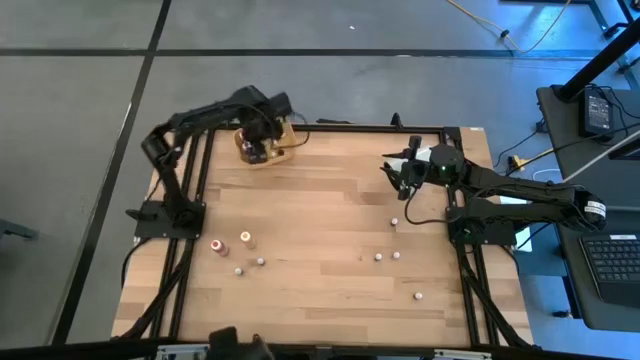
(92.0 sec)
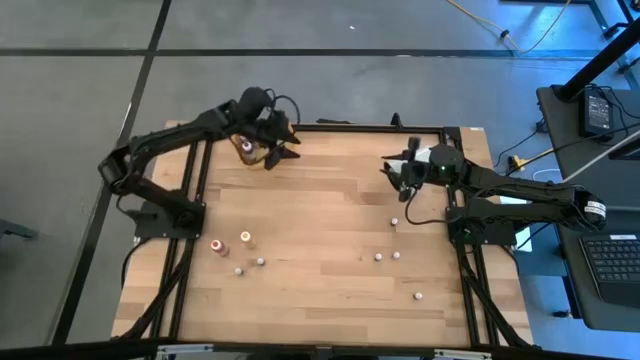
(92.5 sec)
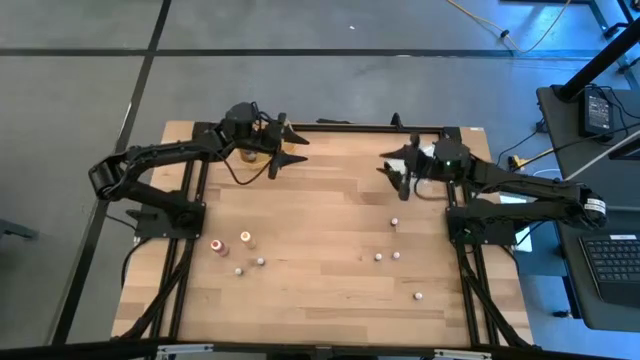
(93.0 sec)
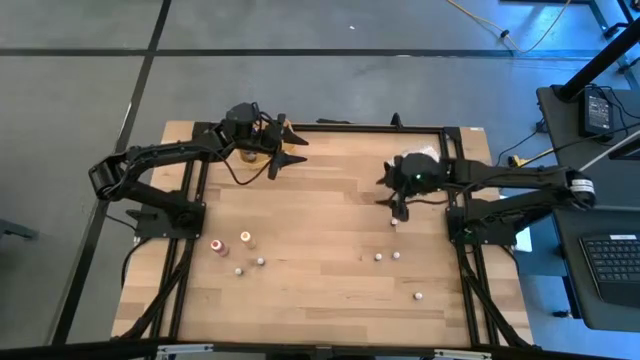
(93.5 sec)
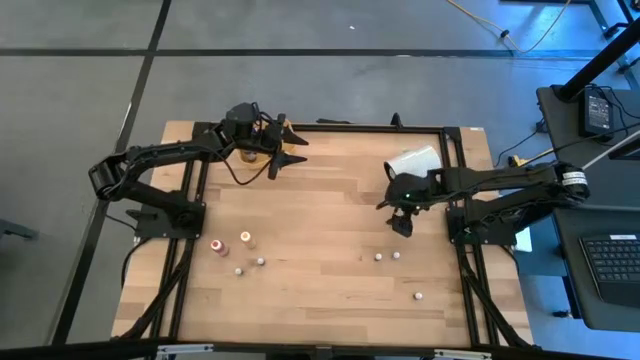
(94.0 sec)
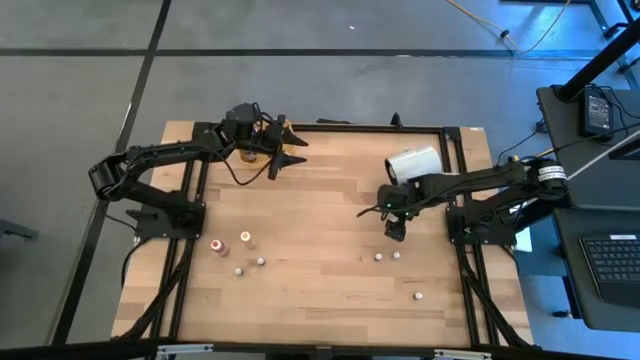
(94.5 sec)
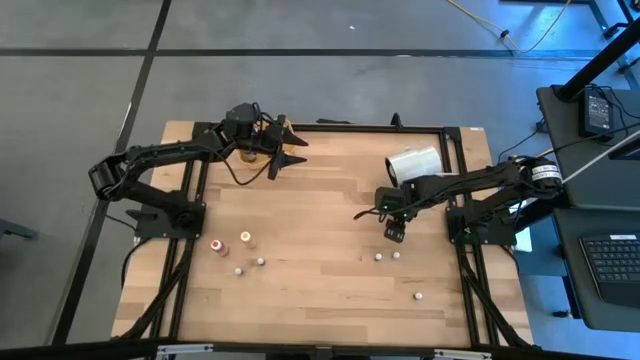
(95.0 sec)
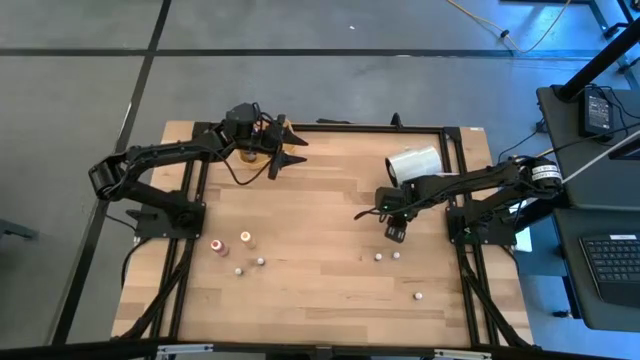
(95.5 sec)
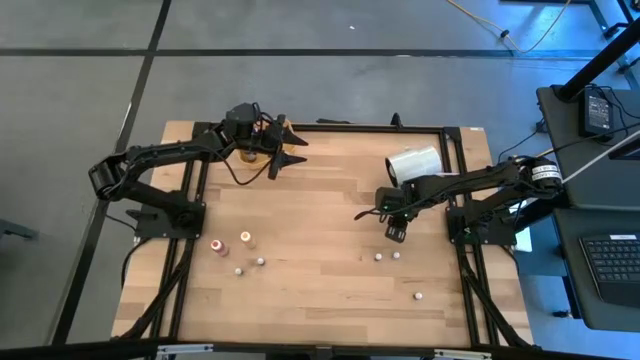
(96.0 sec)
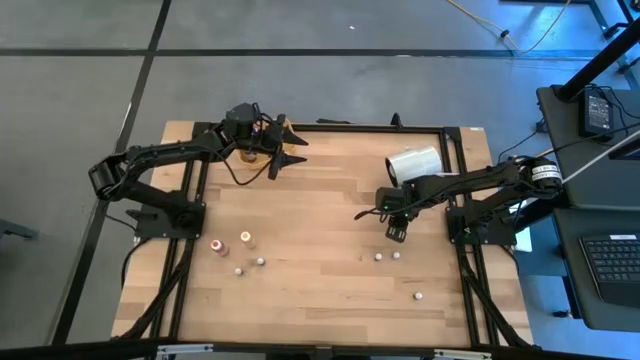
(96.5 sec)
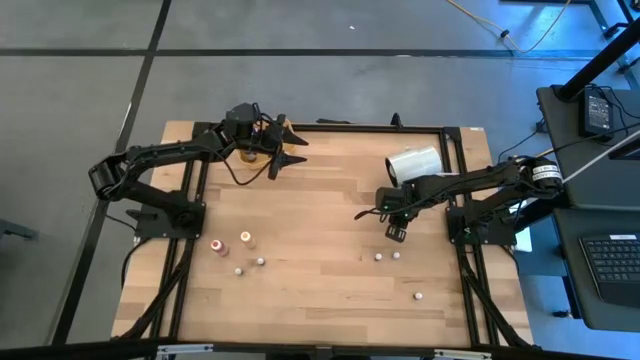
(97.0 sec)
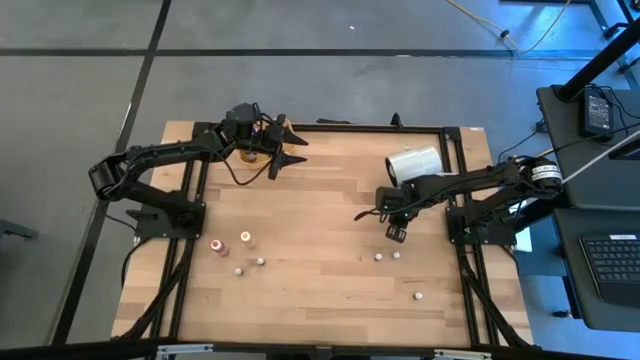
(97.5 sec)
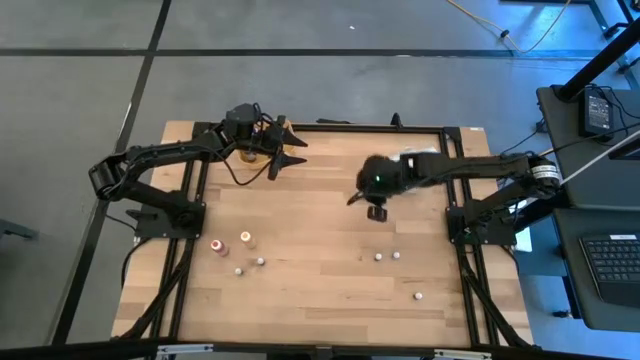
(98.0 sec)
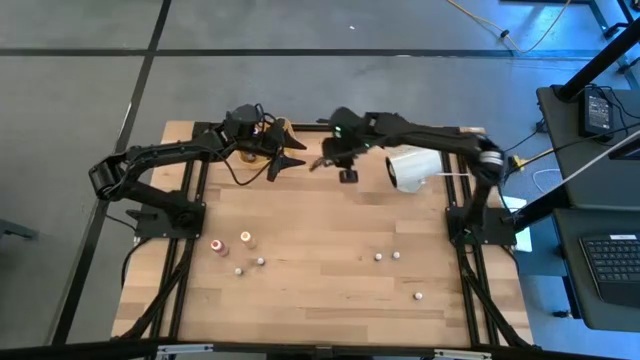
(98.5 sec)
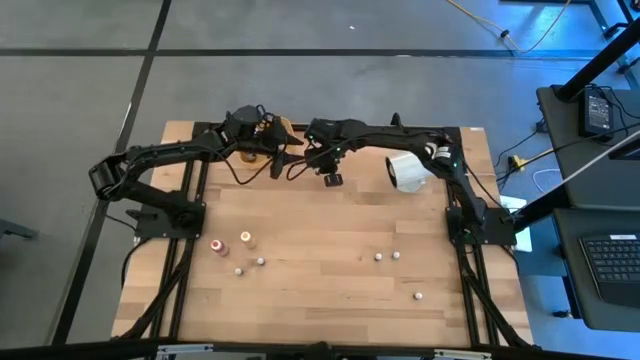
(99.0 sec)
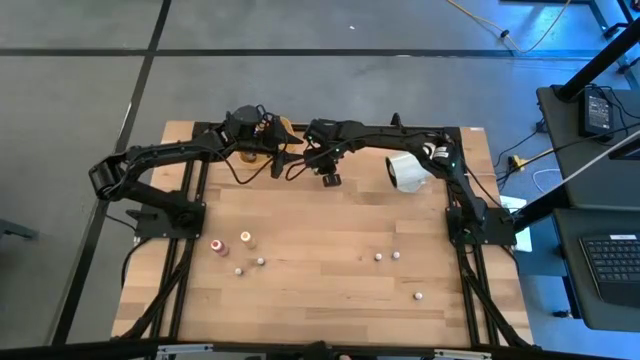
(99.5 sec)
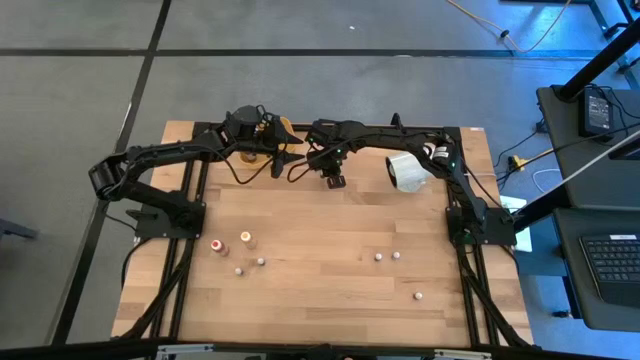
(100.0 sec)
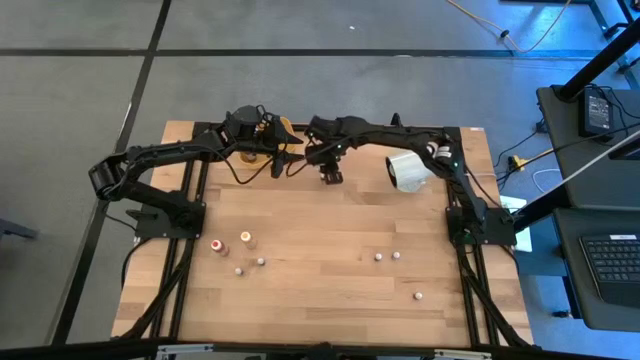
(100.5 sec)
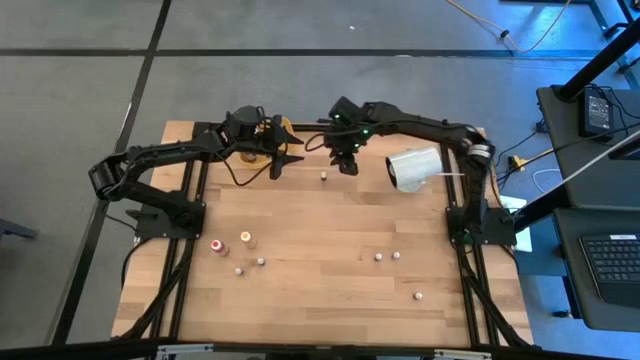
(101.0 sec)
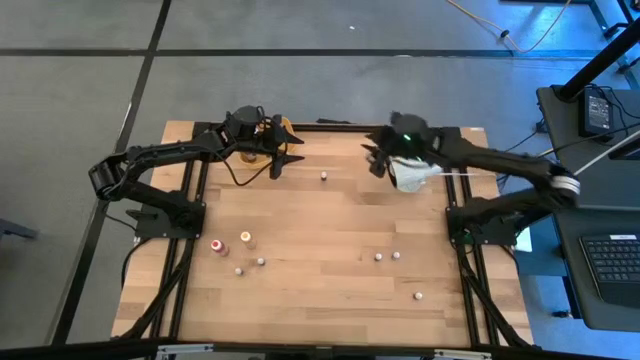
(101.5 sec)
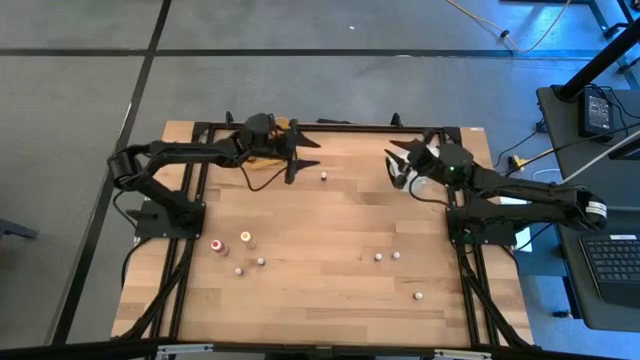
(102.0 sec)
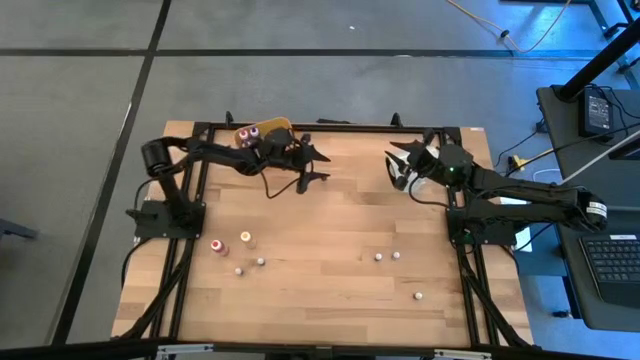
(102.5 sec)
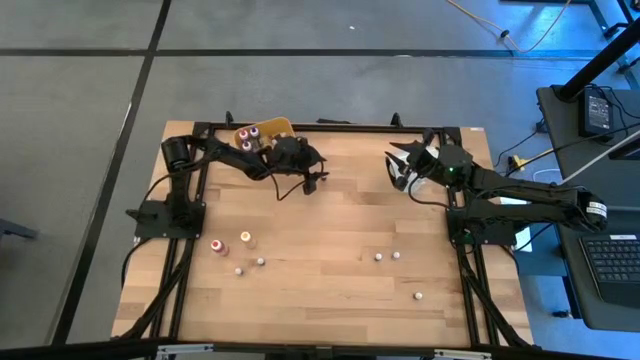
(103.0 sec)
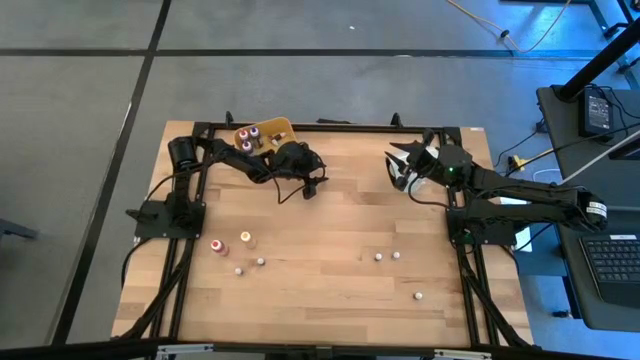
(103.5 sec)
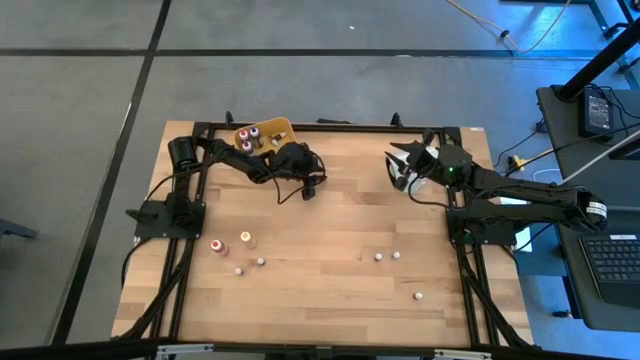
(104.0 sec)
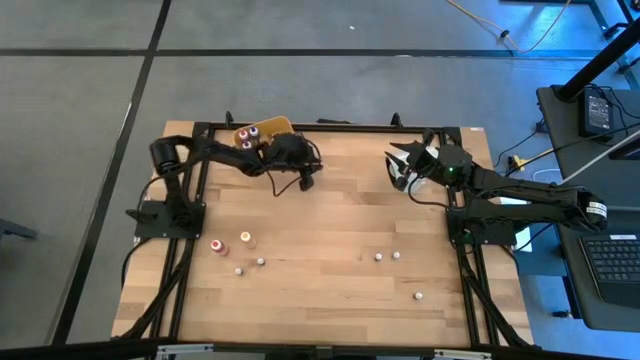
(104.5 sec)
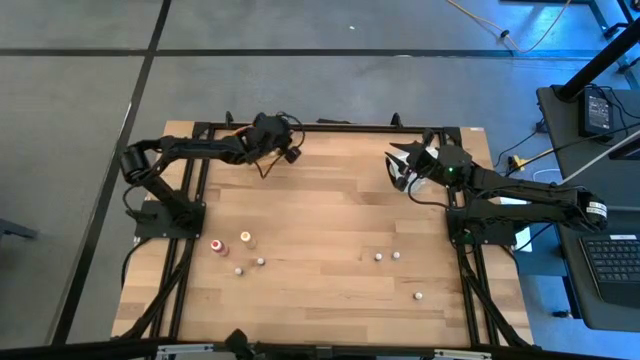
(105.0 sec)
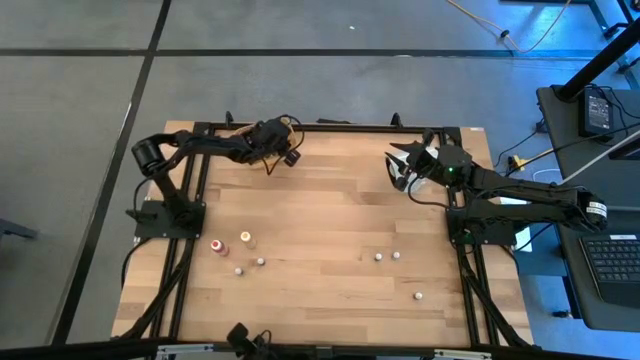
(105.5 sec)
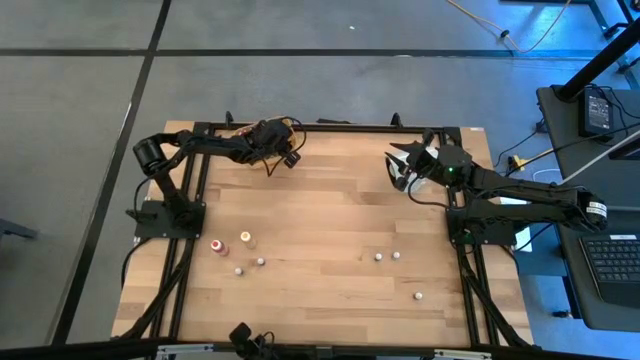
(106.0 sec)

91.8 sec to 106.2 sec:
Task: Pick & Place food coloring
Put the small red food coloring bottle into the yellow bin

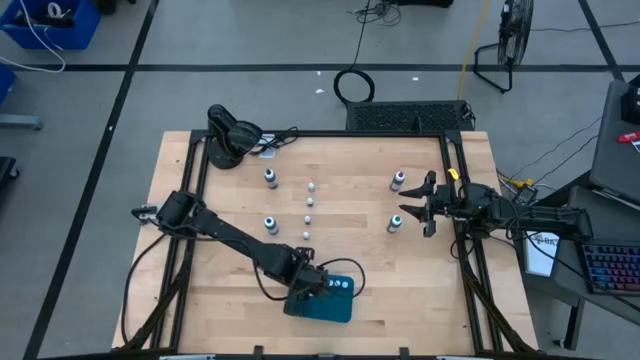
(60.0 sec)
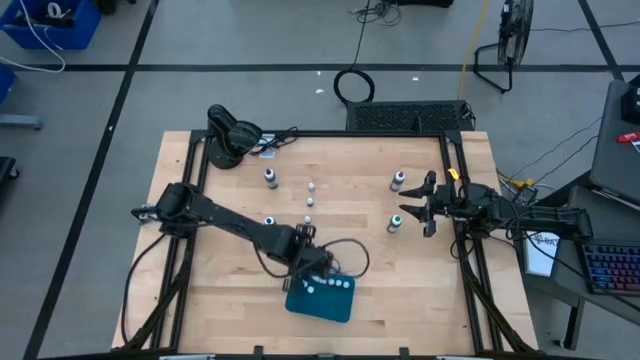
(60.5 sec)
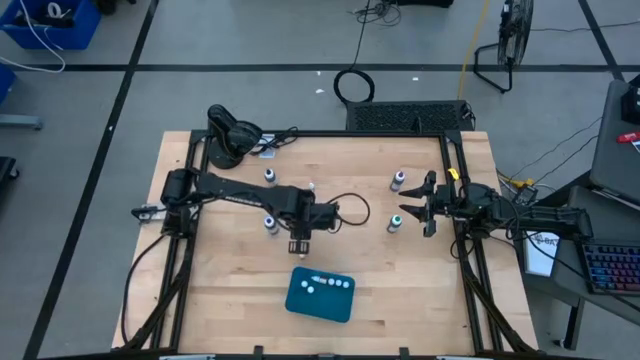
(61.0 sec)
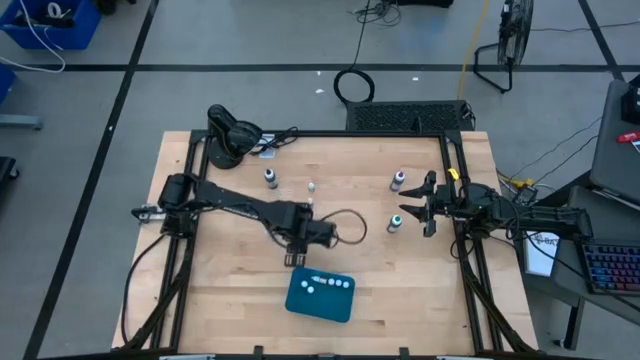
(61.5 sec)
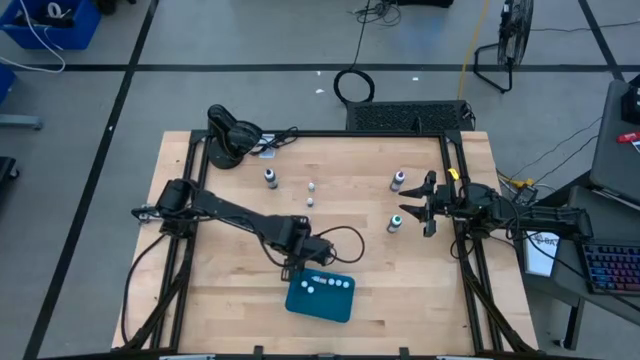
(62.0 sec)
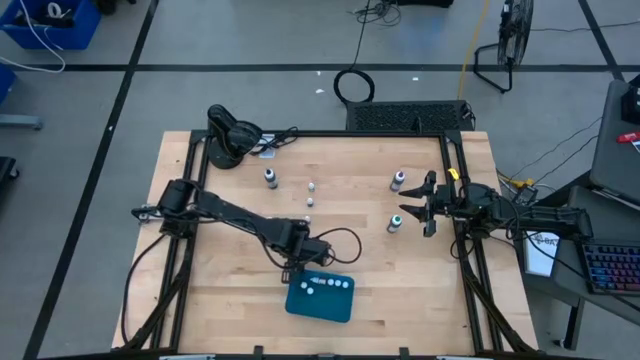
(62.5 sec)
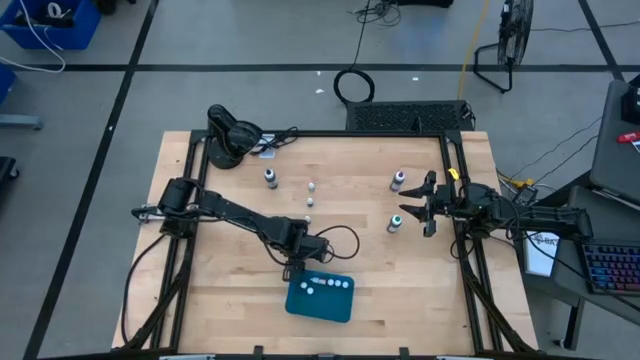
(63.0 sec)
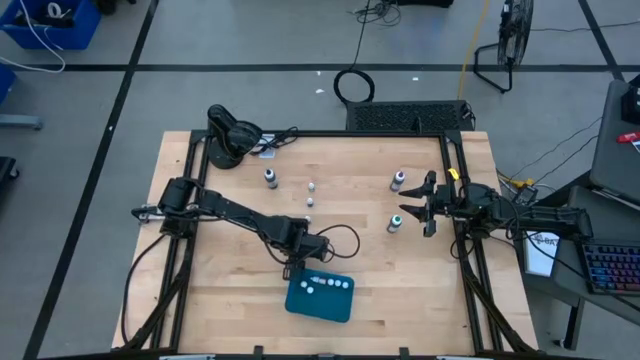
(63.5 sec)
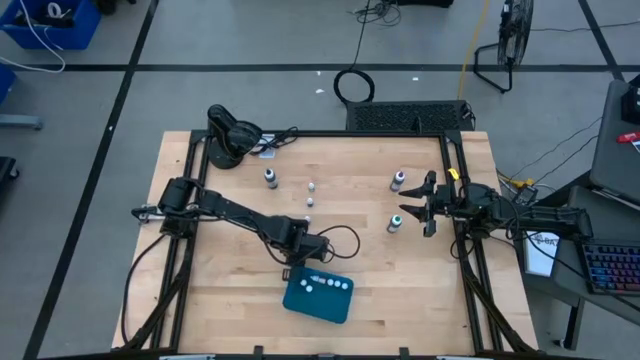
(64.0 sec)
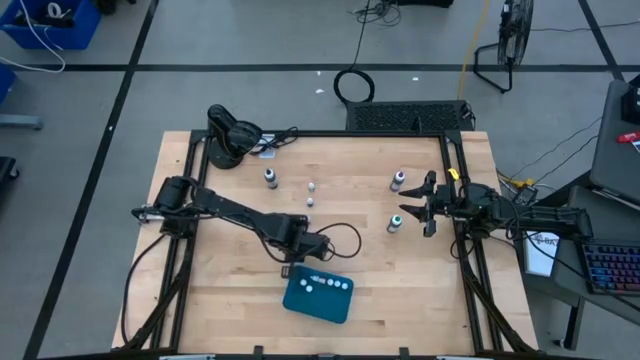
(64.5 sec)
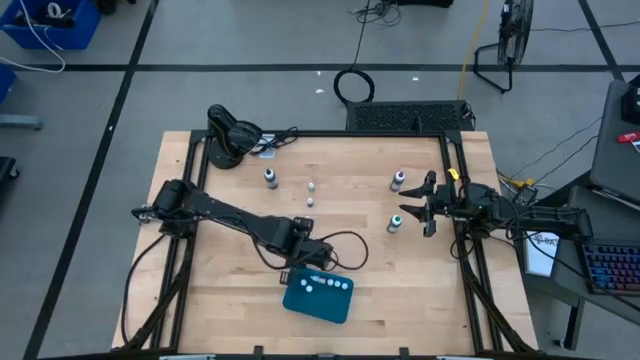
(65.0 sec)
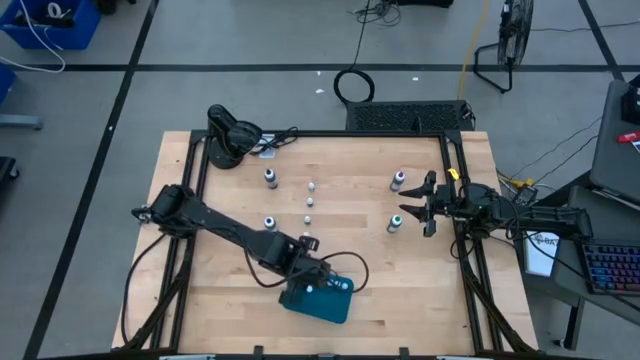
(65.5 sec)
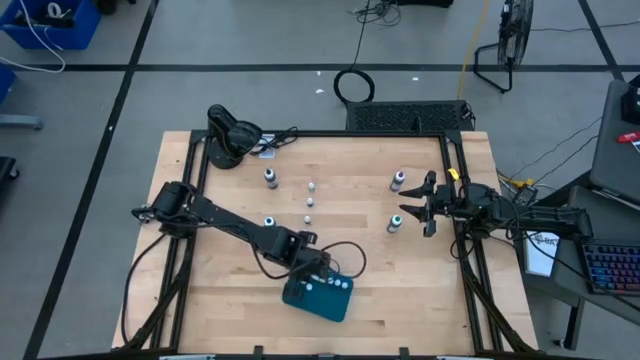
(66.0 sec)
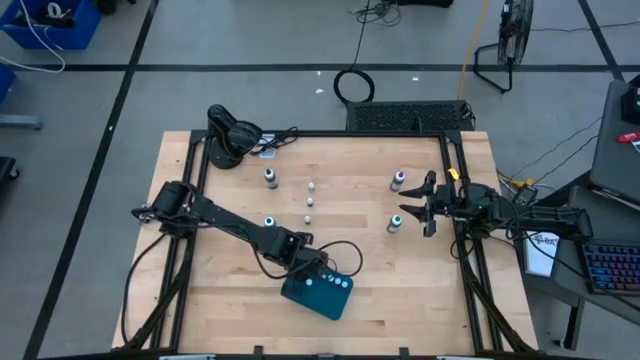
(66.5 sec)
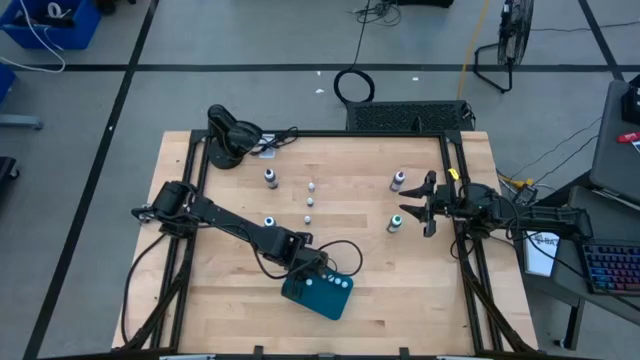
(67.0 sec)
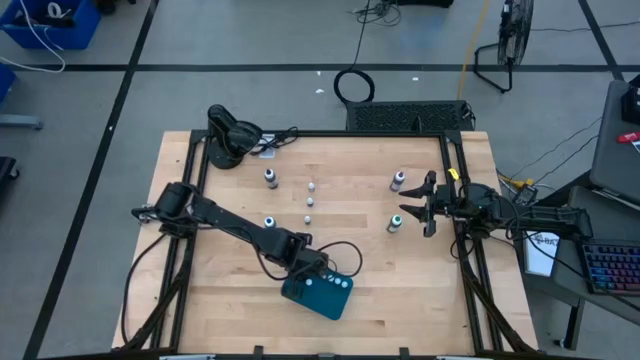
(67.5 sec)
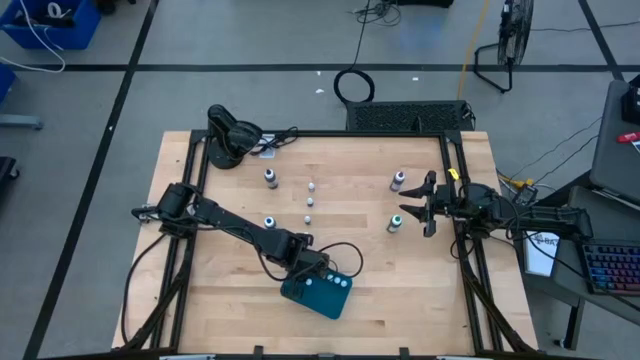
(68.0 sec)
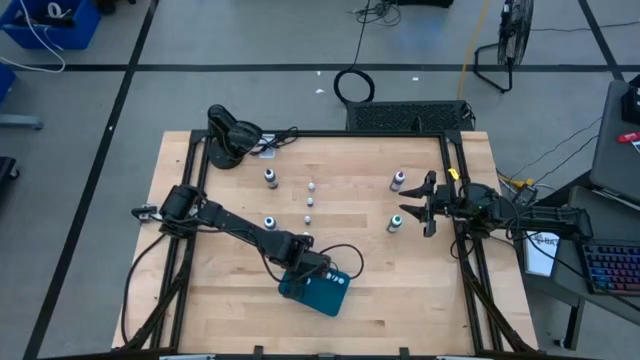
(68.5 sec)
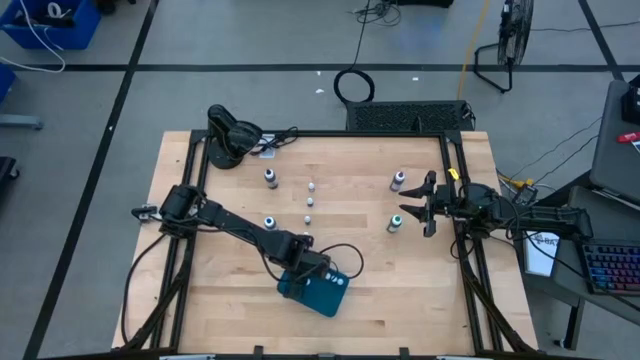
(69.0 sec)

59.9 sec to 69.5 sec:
Task: Pick & Place food coloring
Put the small yellow coloring bottle into the blue bin
